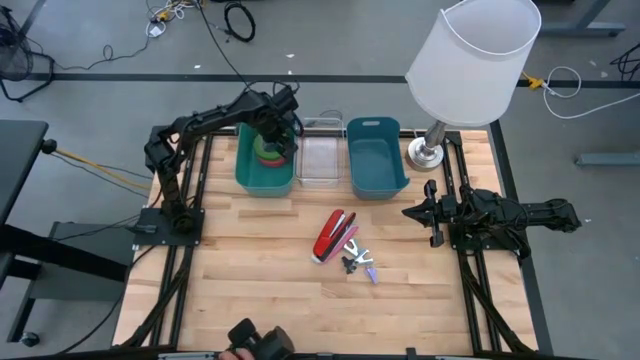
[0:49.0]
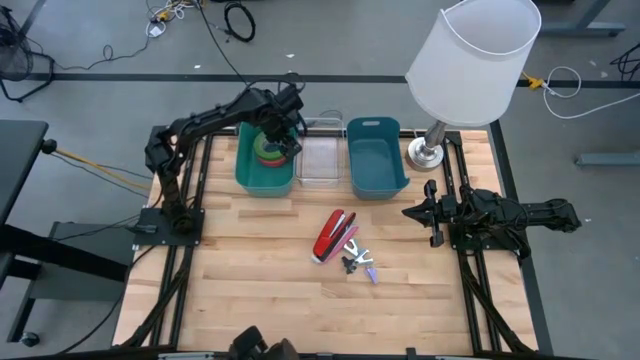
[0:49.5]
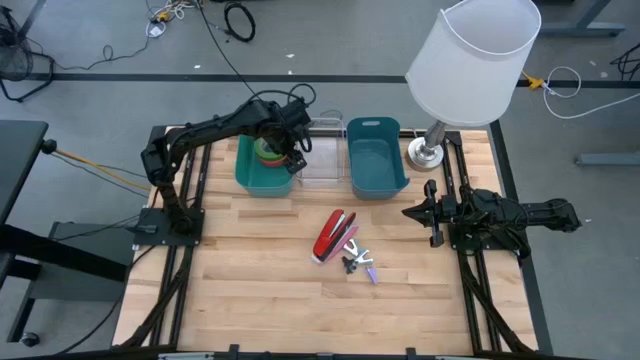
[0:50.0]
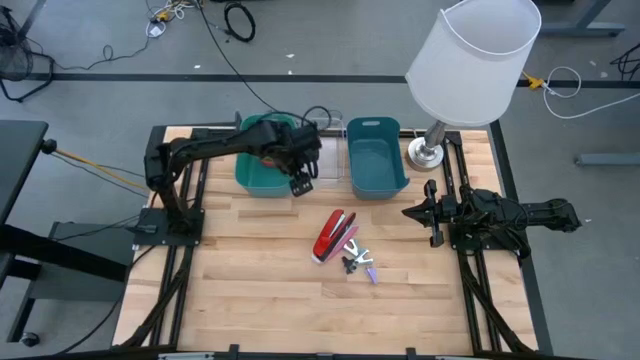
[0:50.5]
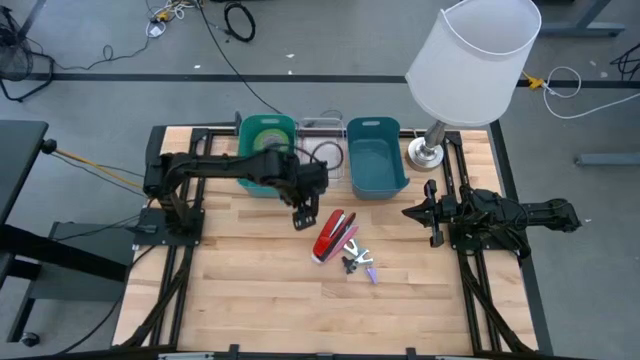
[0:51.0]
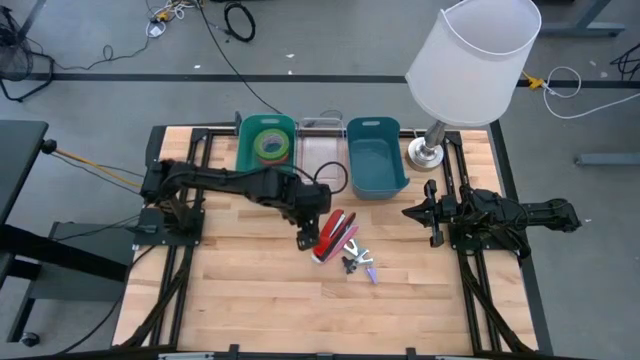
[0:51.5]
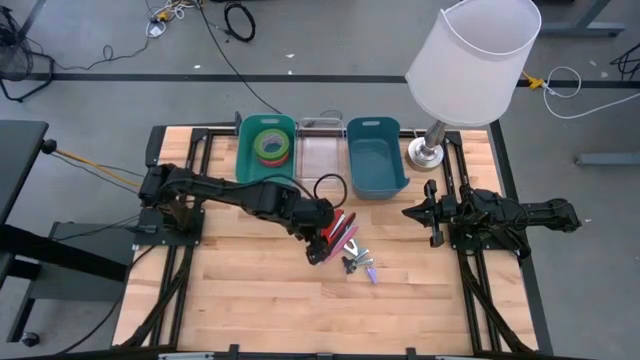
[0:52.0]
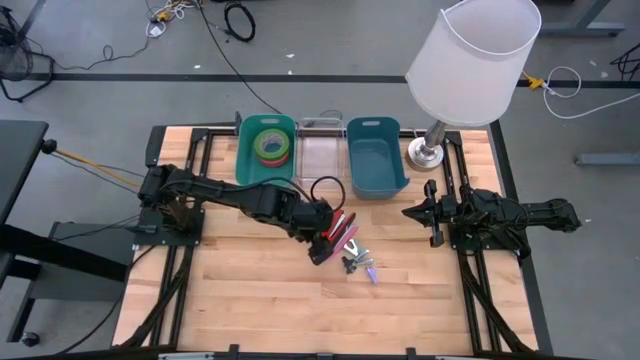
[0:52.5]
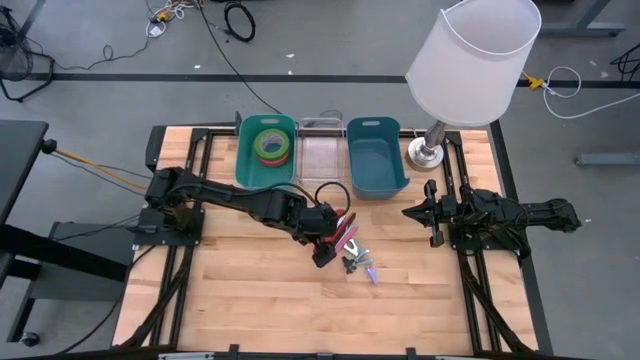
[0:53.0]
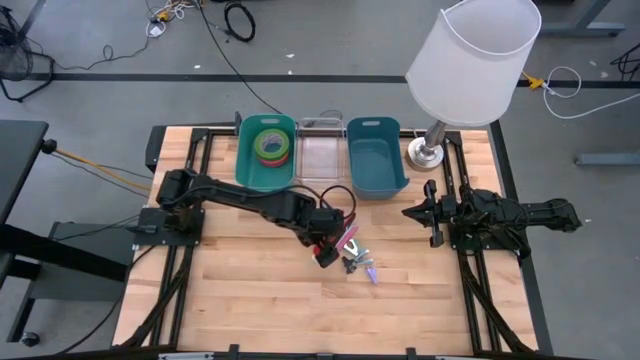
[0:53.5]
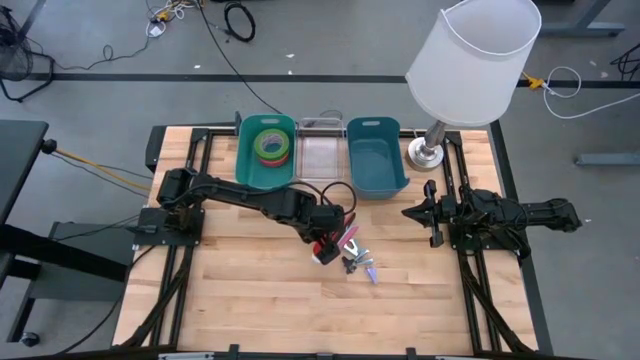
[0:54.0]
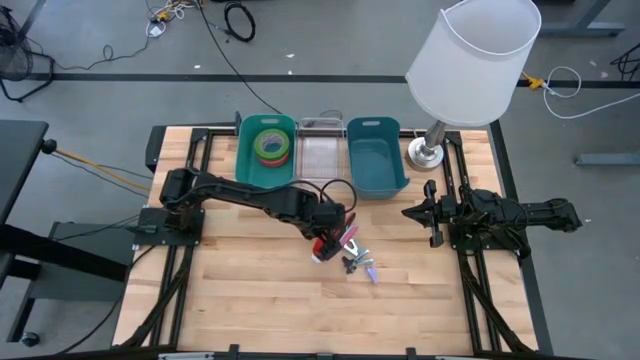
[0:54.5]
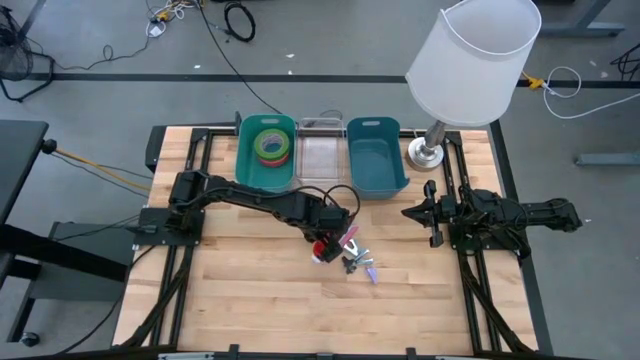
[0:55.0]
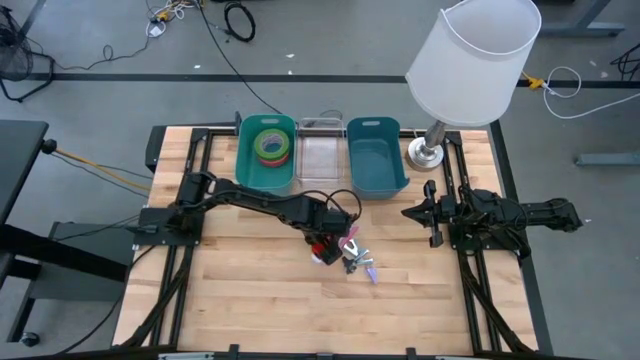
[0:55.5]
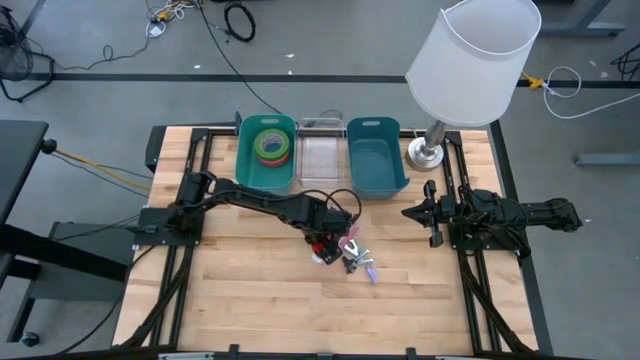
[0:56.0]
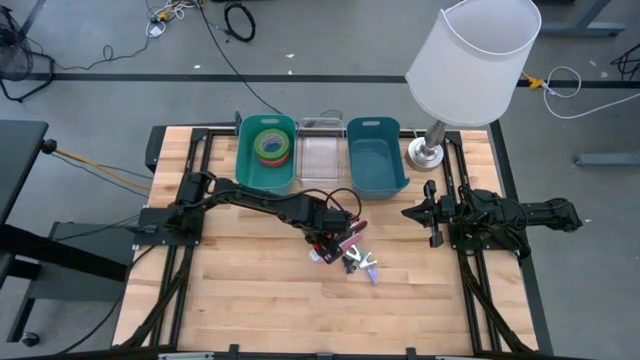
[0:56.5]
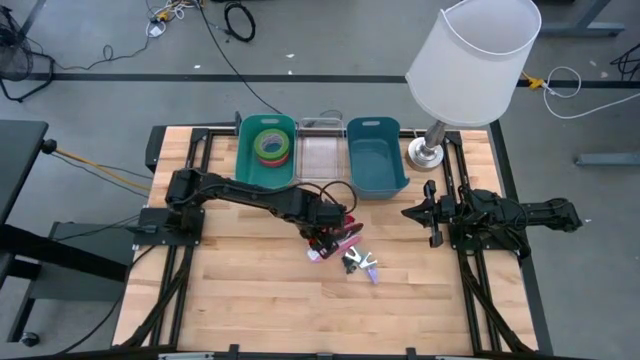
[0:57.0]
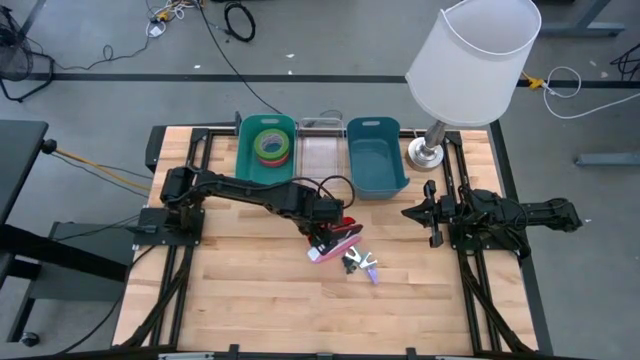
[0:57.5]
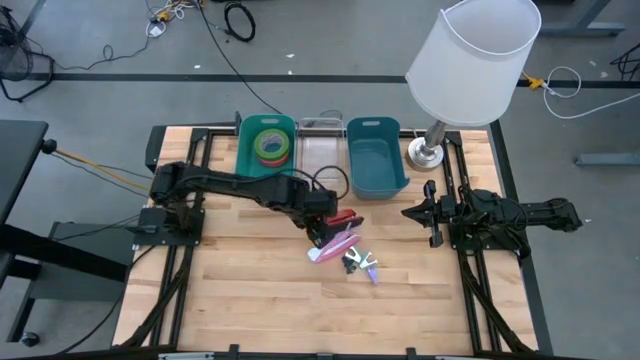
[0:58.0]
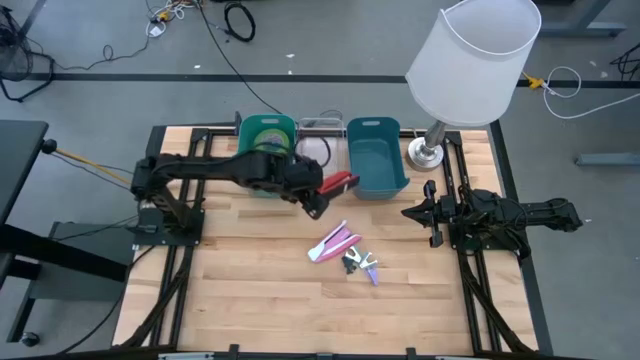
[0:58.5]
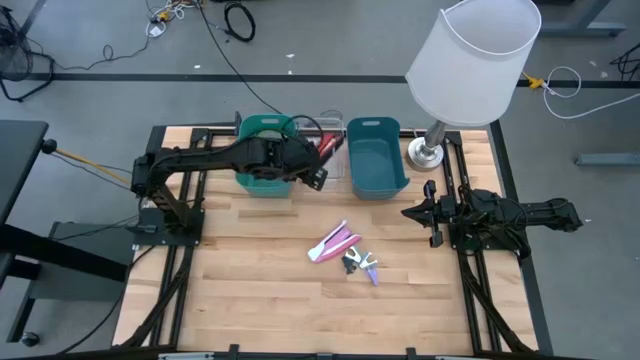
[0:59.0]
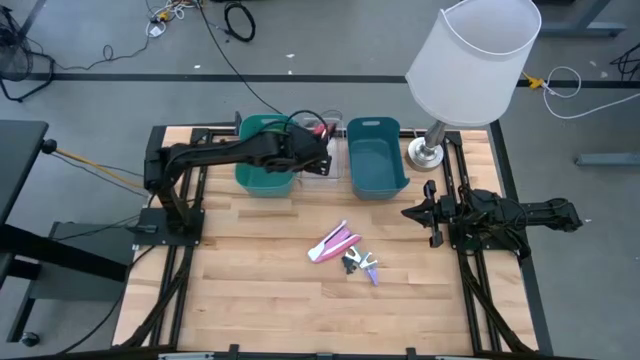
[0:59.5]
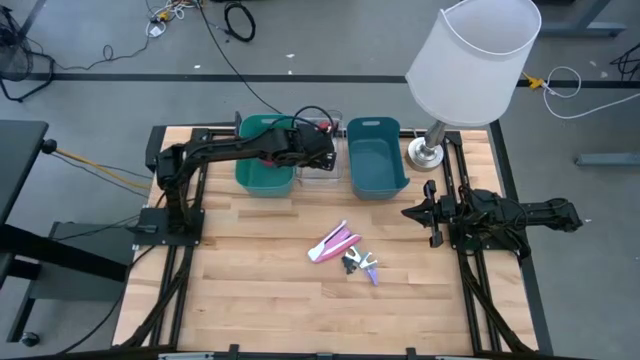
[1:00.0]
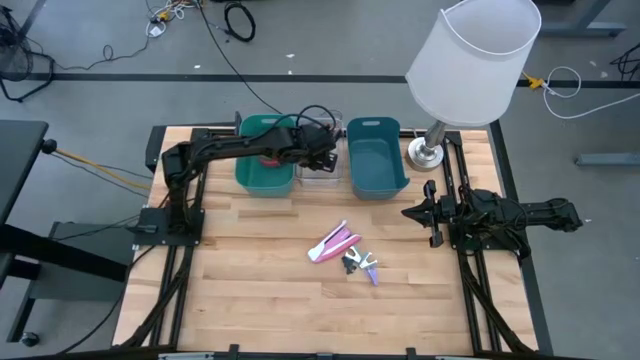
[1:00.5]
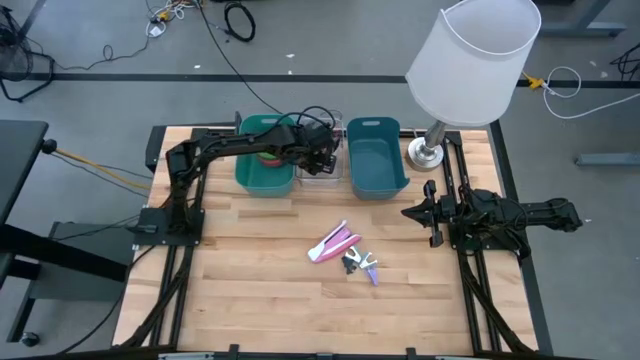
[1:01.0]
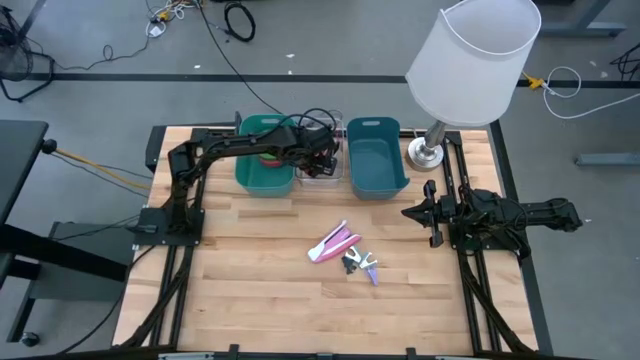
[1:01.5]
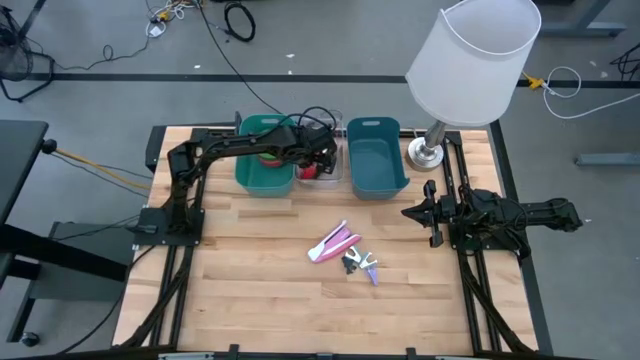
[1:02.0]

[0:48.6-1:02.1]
Task: Pick and place Stapler, Stapler remover, tape
Put the red stapler into the transparent bin

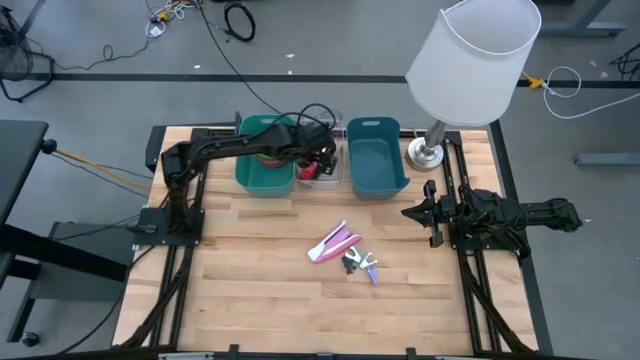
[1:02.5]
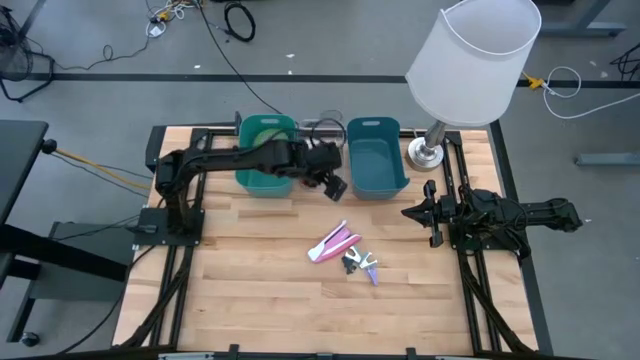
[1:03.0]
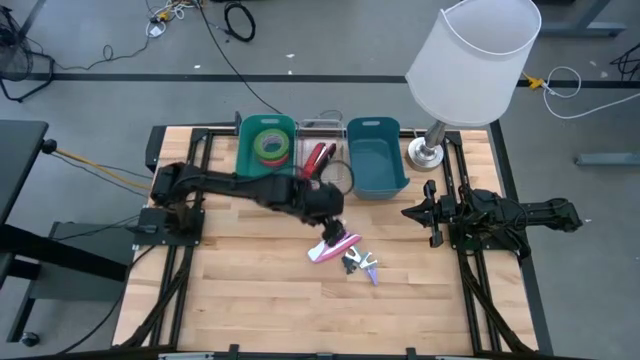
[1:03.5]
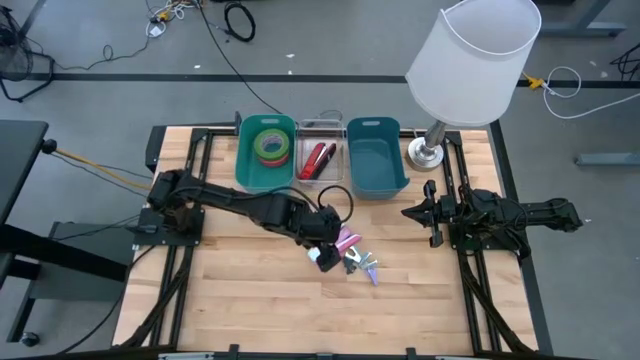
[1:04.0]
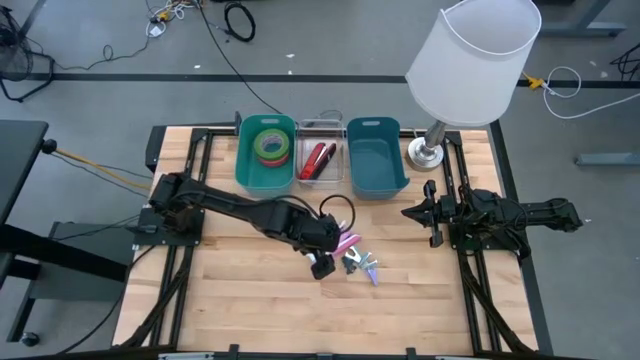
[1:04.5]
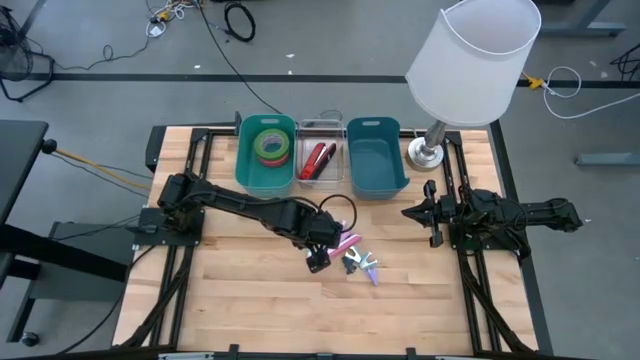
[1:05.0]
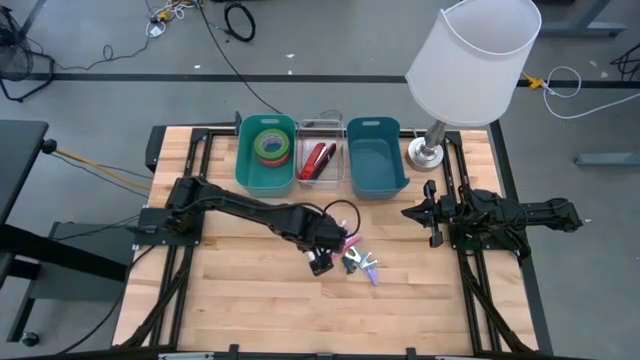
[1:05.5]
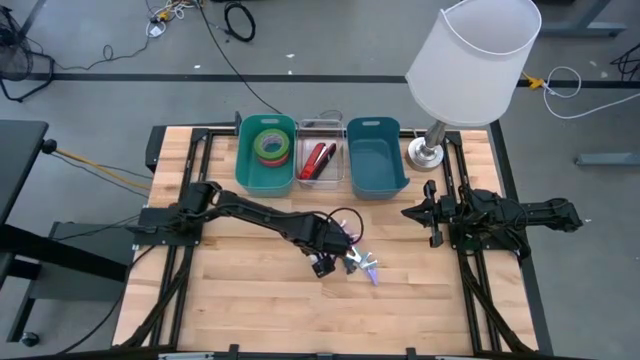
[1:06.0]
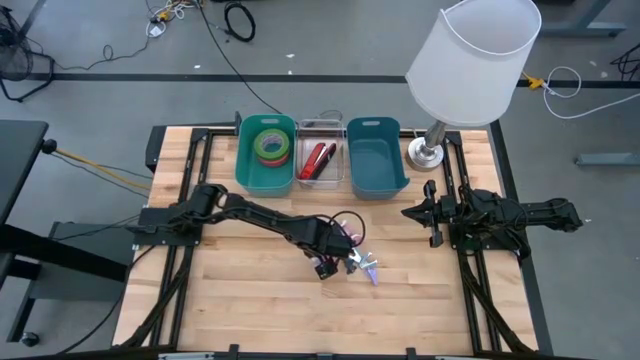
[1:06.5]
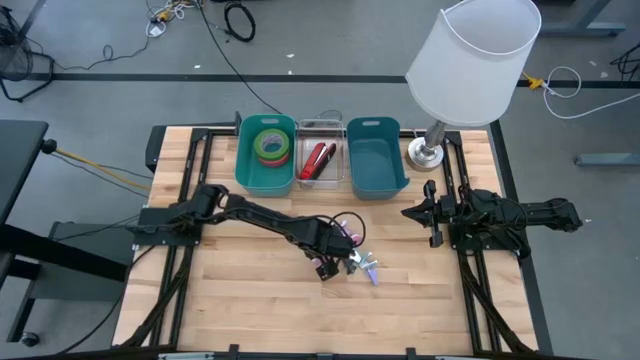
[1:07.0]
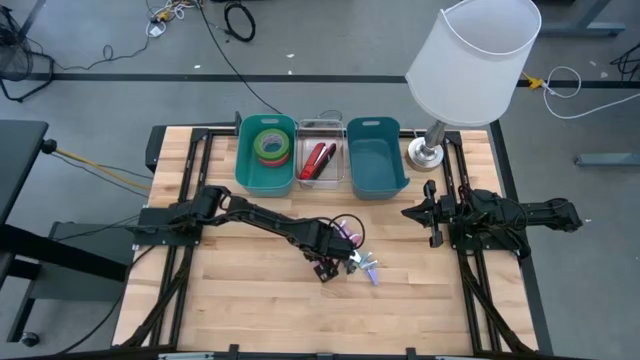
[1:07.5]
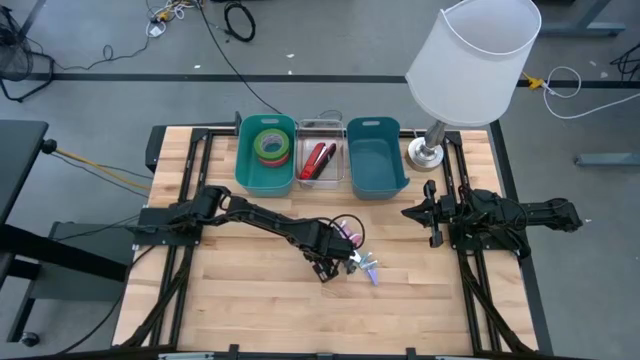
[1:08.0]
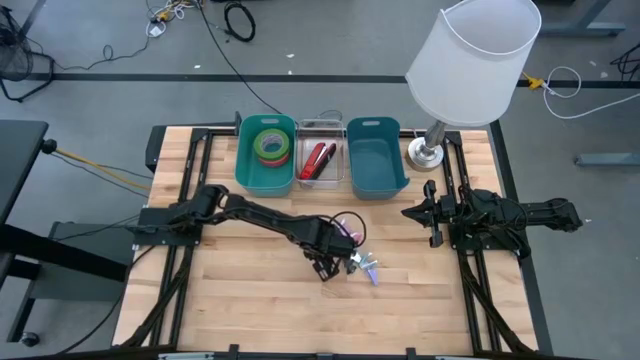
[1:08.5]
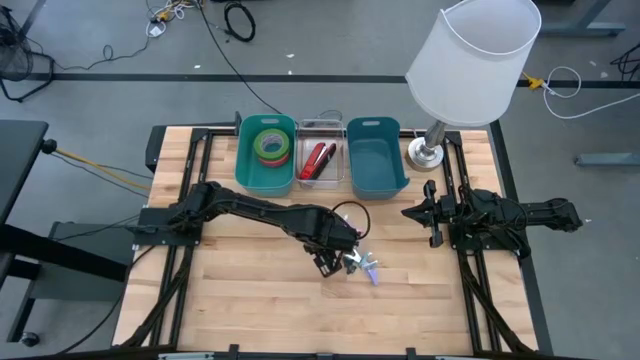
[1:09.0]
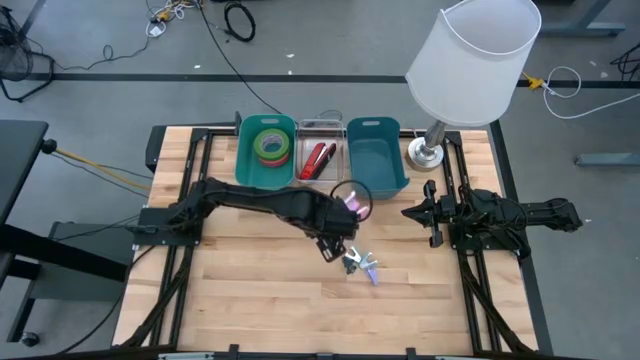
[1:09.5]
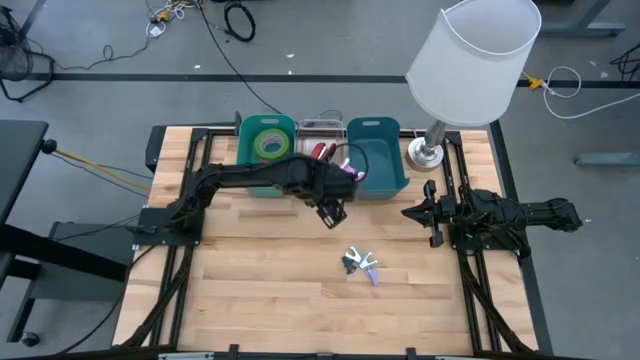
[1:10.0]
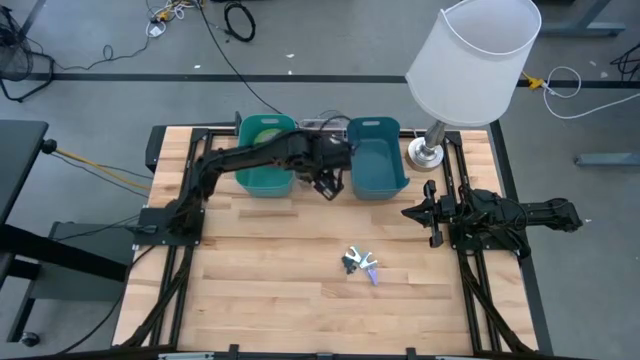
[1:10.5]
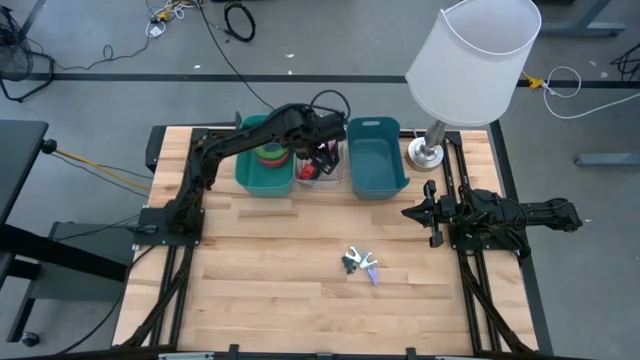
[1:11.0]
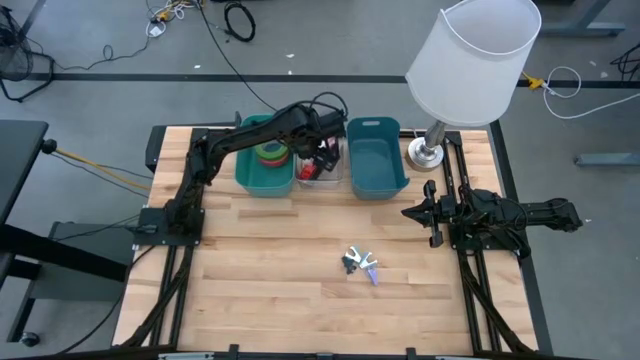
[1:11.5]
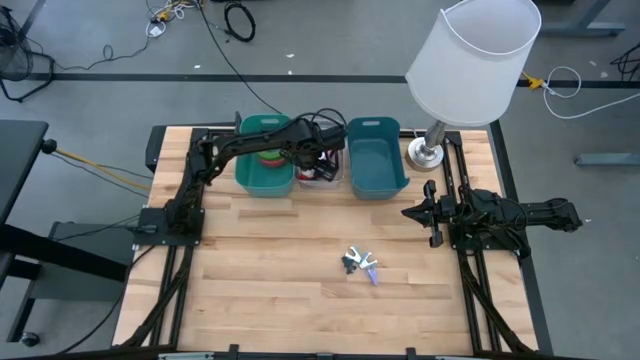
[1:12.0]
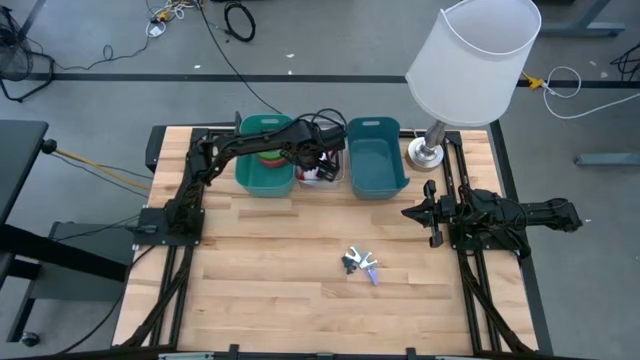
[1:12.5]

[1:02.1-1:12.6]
Put the pink stapler into the transparent bin
